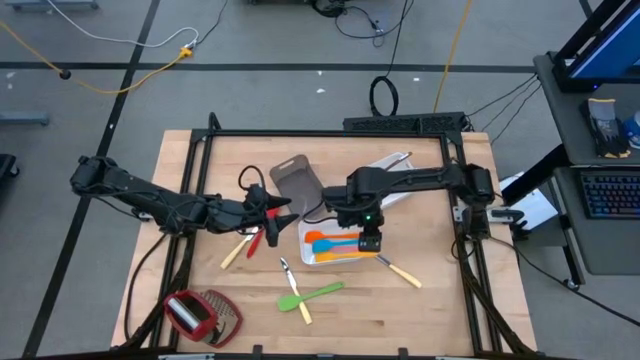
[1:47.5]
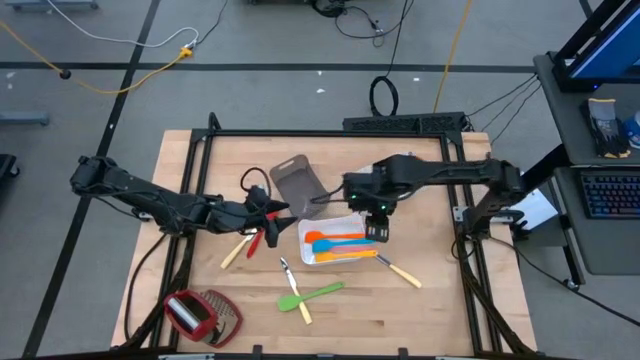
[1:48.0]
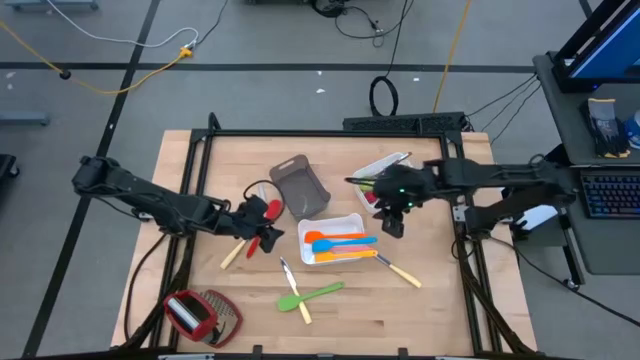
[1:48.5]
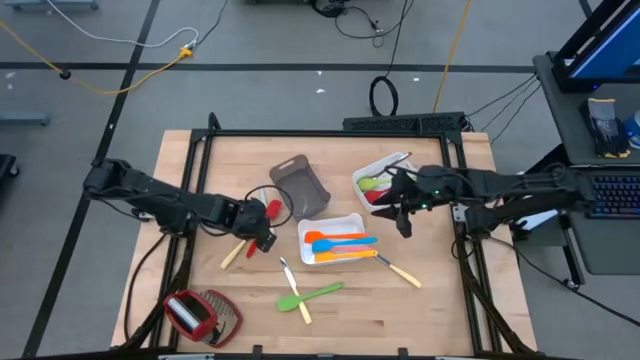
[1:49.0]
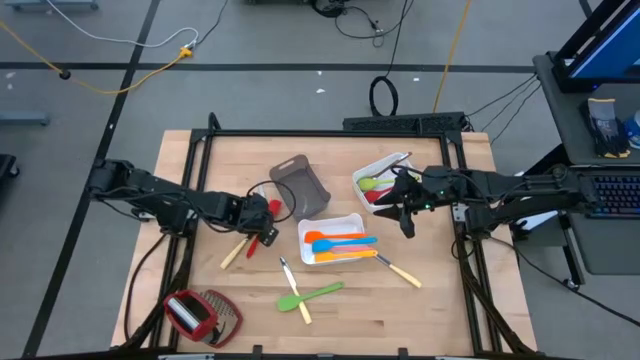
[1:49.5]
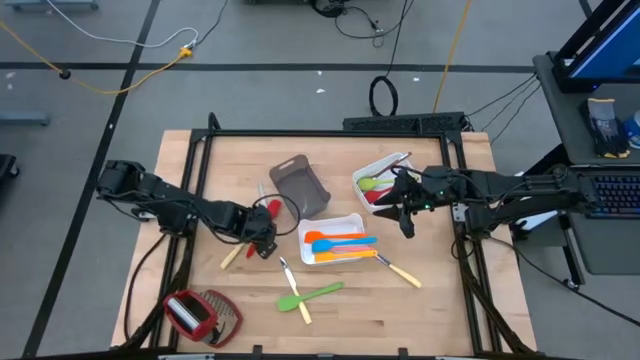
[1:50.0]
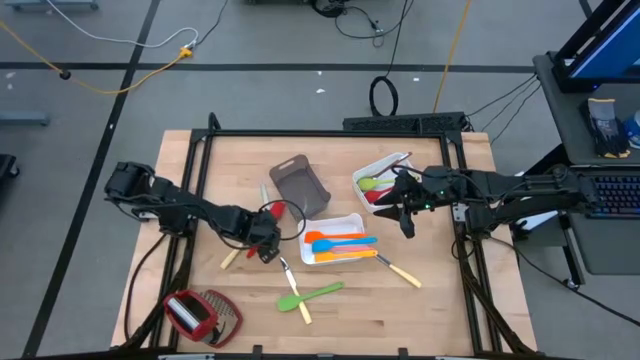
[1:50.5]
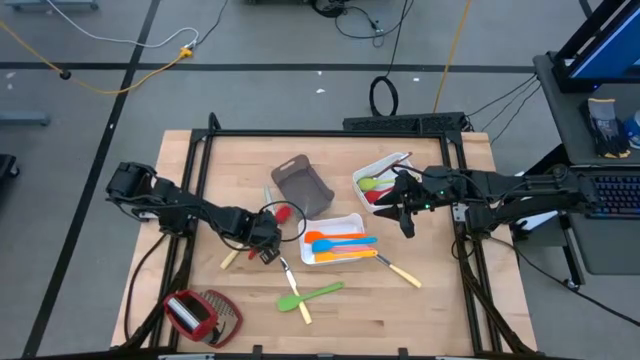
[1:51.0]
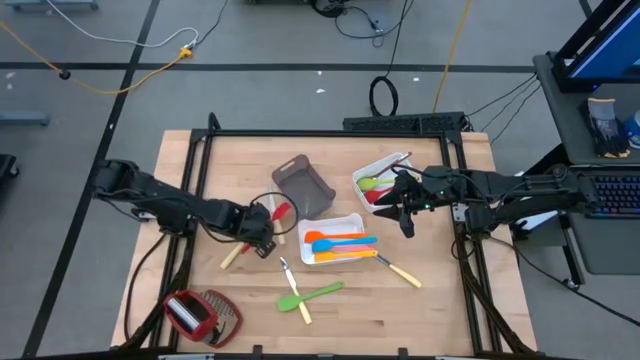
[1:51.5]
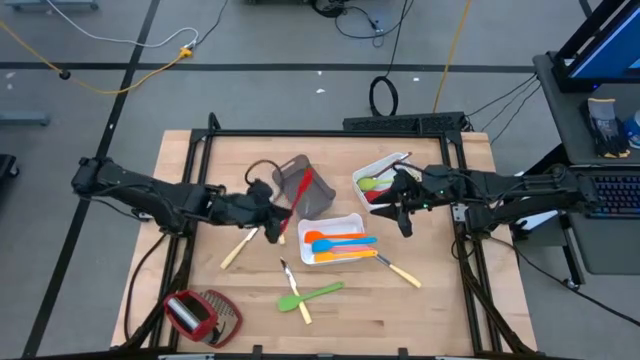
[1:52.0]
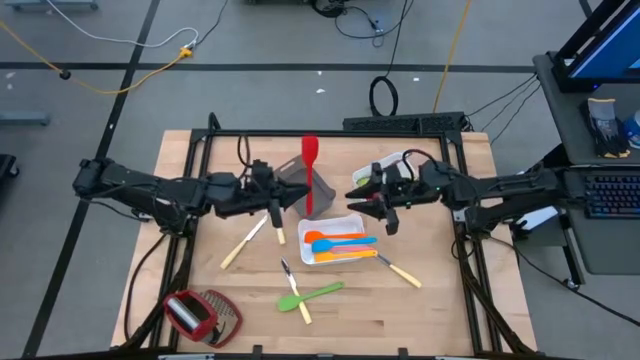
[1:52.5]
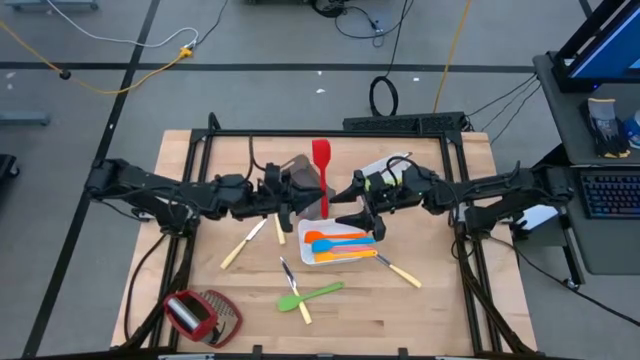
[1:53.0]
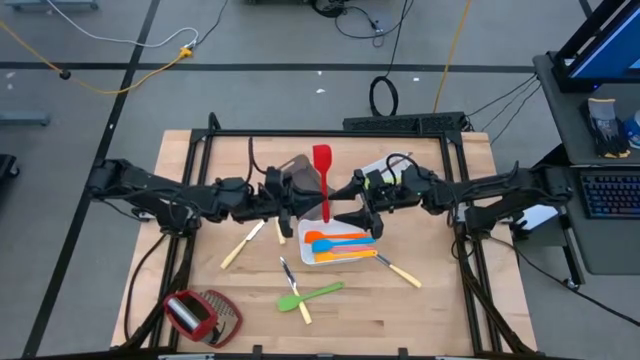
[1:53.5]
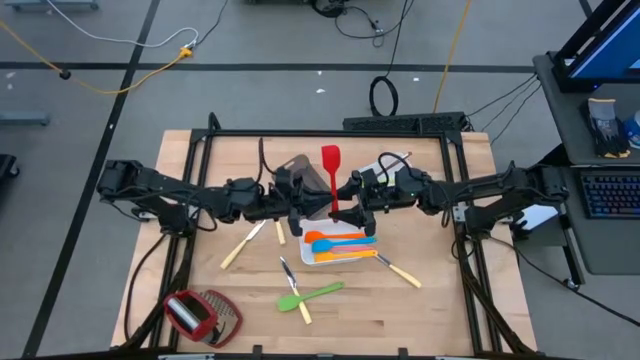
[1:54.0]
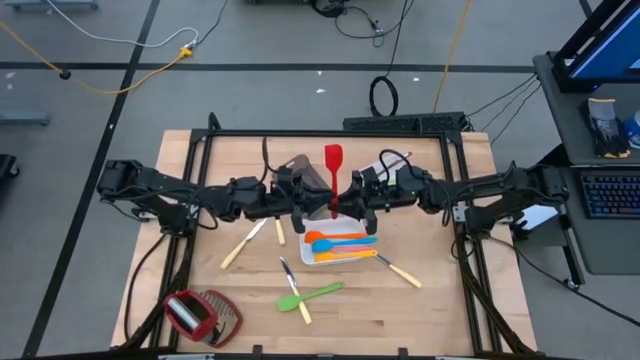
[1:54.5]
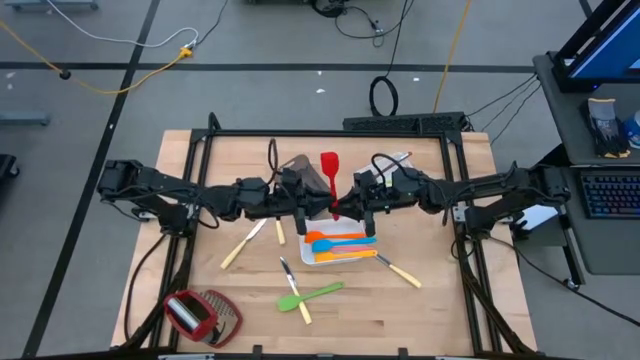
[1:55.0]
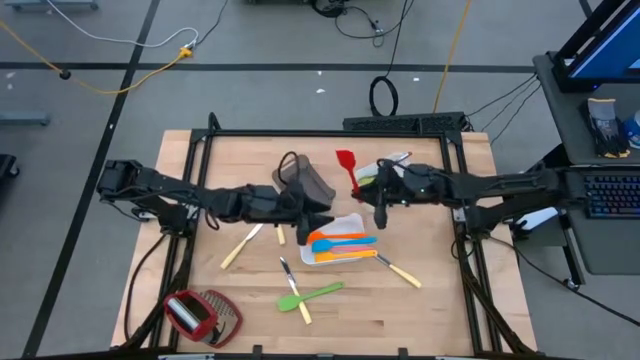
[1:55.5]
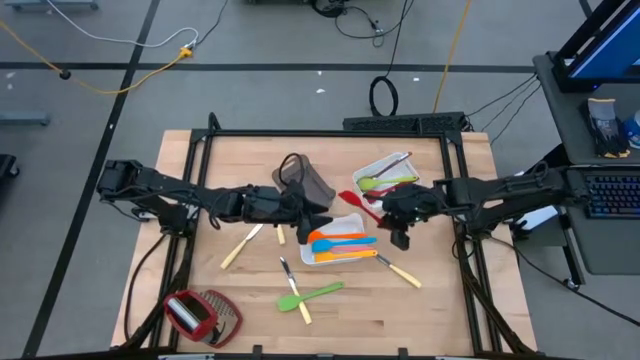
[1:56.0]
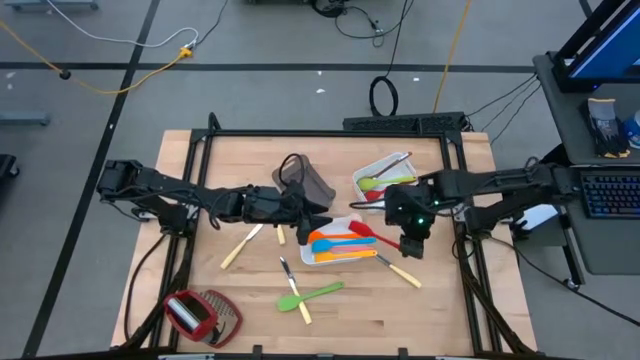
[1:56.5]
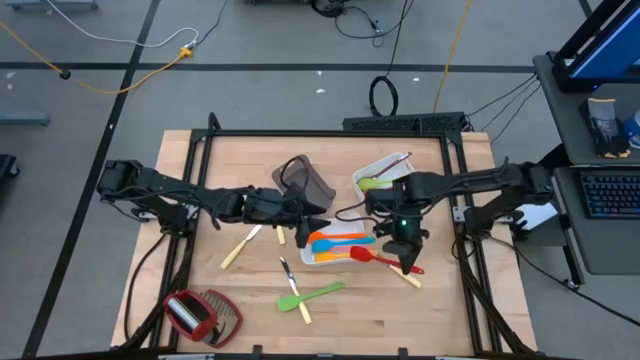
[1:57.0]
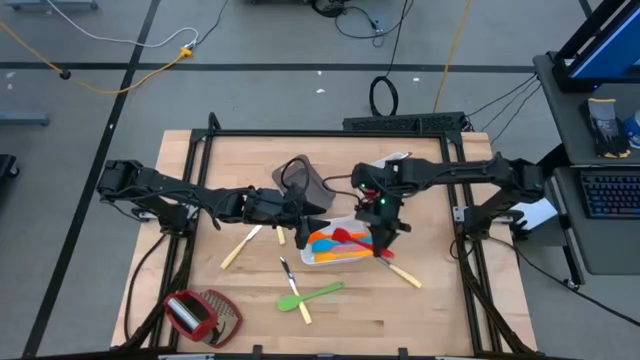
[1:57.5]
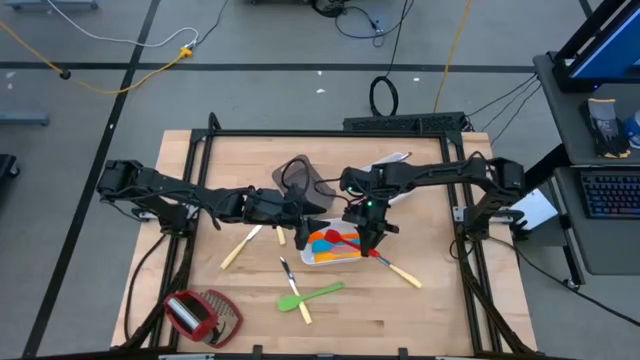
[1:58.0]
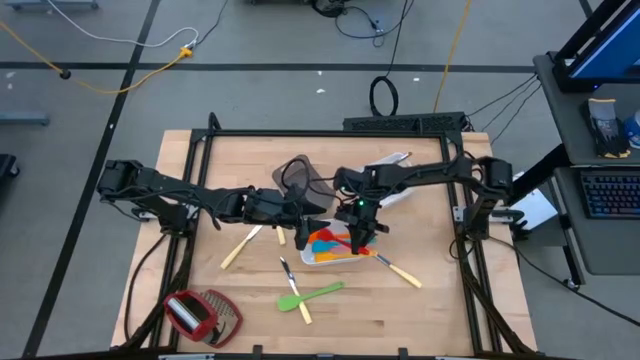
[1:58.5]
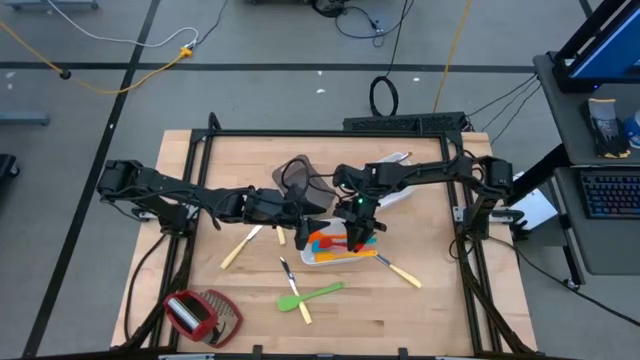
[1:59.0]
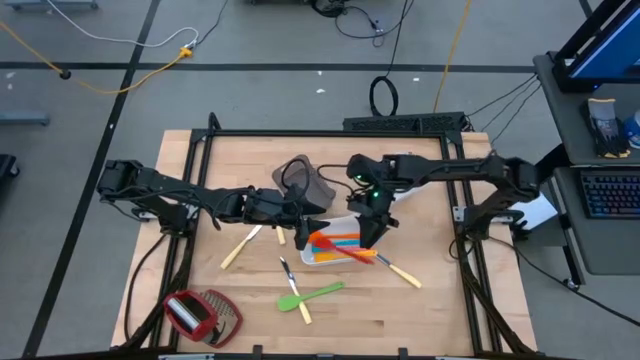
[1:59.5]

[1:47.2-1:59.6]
Task: Pick & Place Kitchen Items
Put the red spatula into bottom white bin

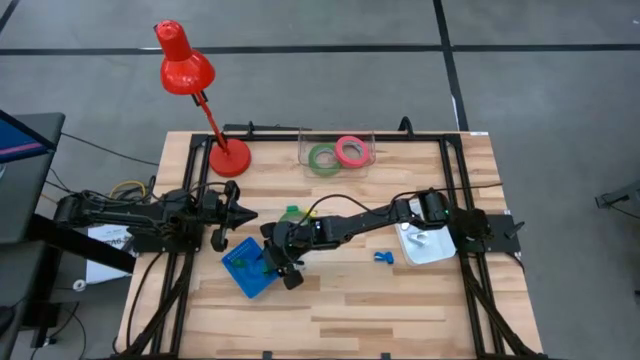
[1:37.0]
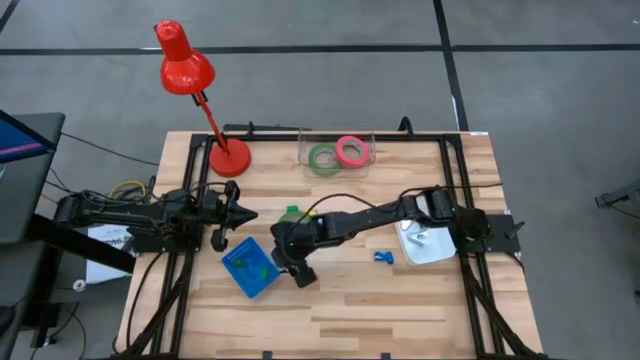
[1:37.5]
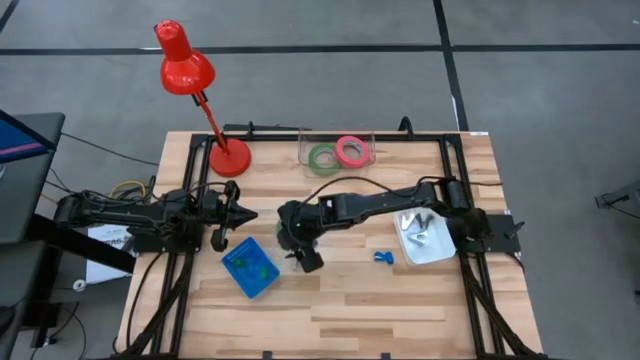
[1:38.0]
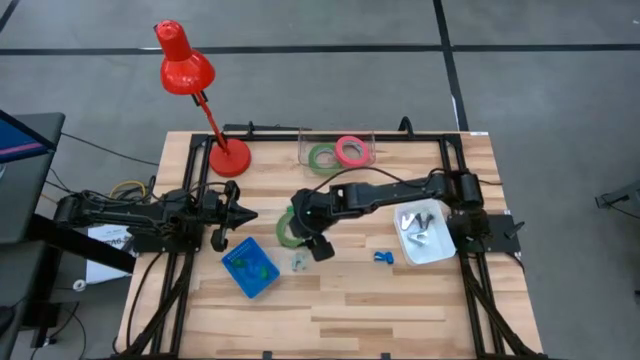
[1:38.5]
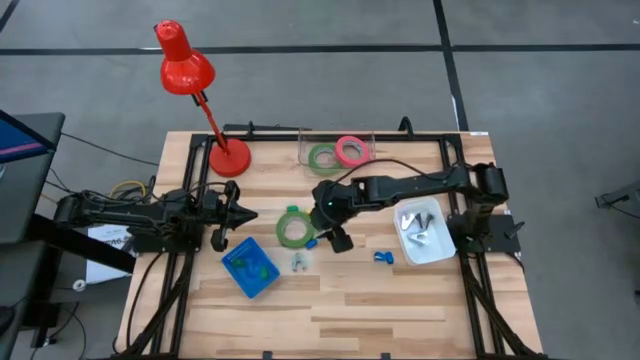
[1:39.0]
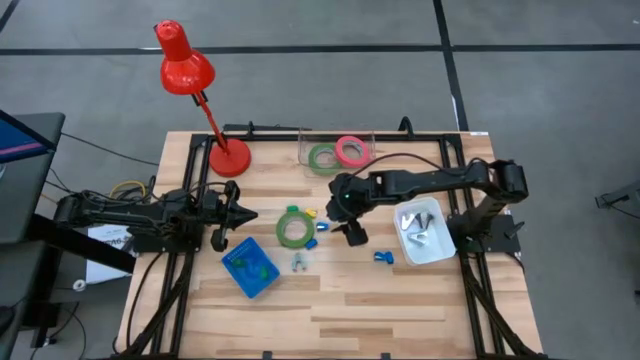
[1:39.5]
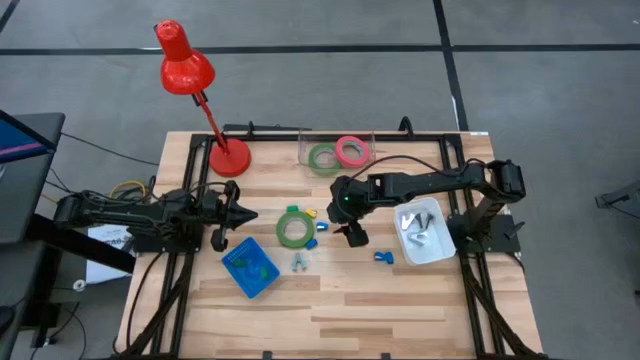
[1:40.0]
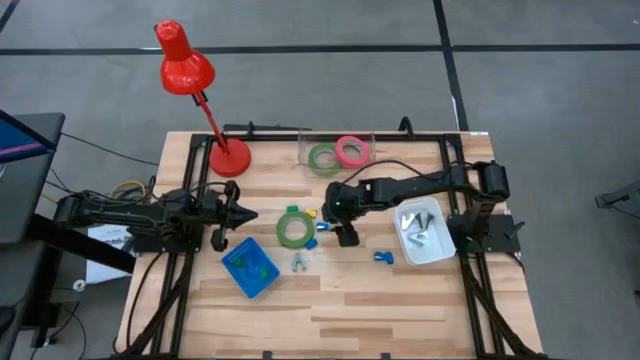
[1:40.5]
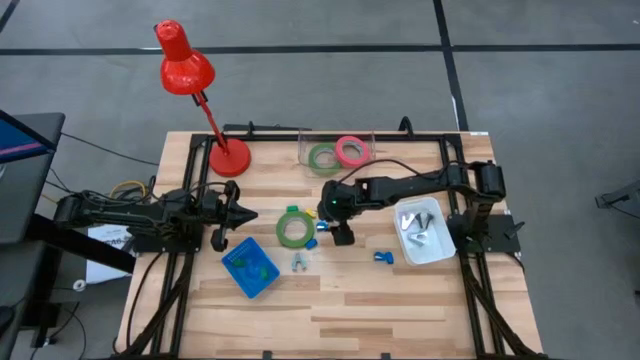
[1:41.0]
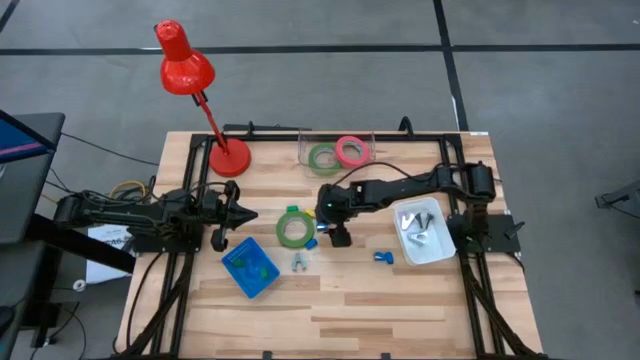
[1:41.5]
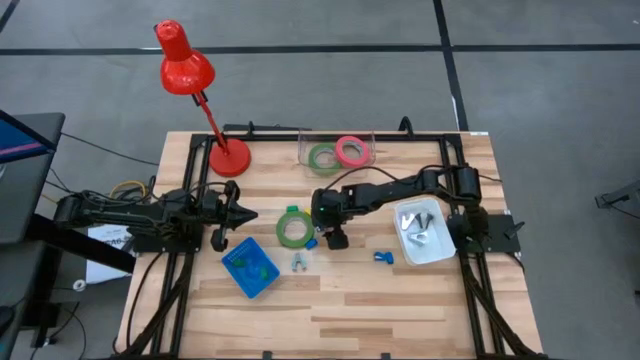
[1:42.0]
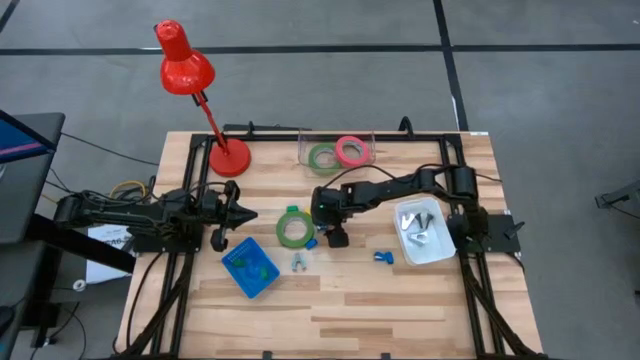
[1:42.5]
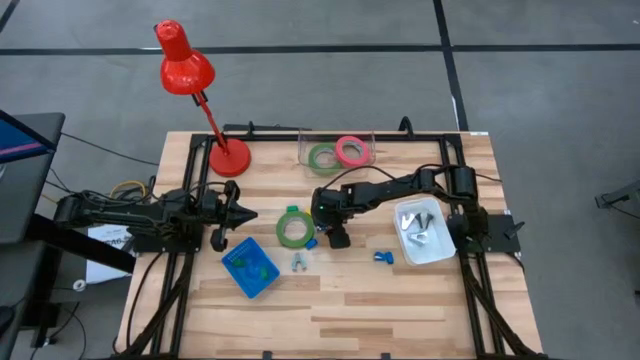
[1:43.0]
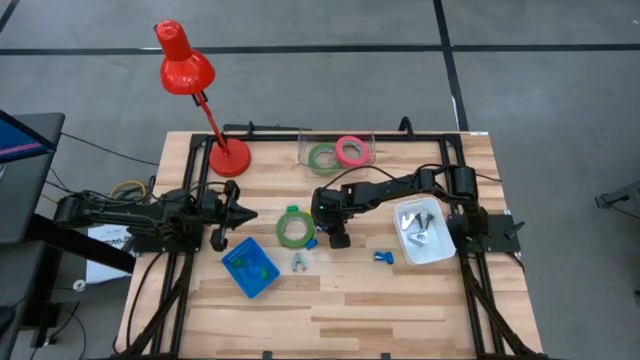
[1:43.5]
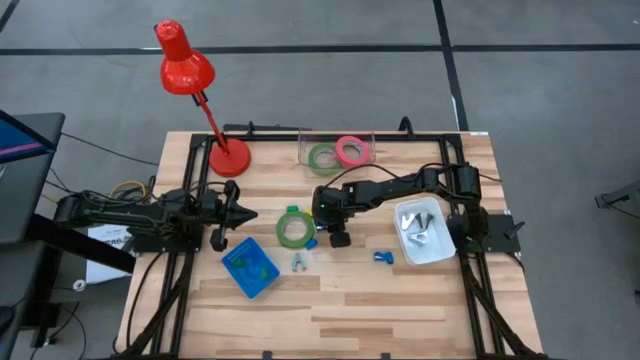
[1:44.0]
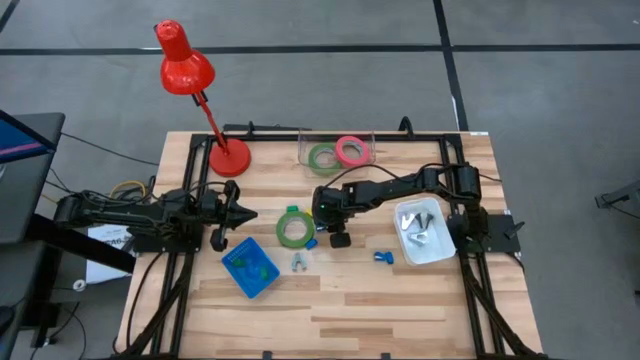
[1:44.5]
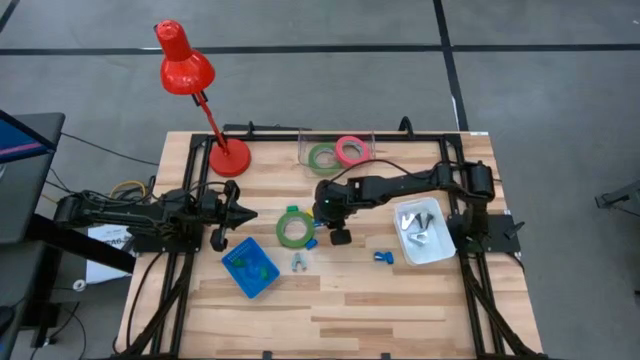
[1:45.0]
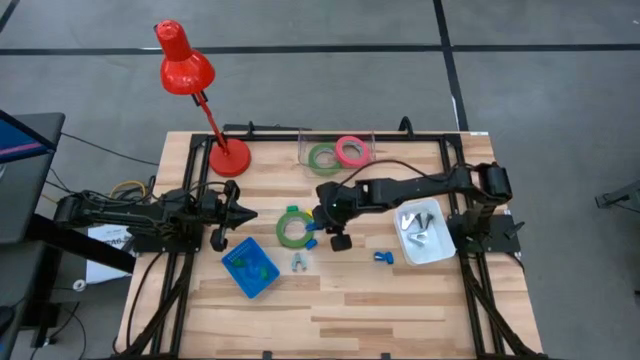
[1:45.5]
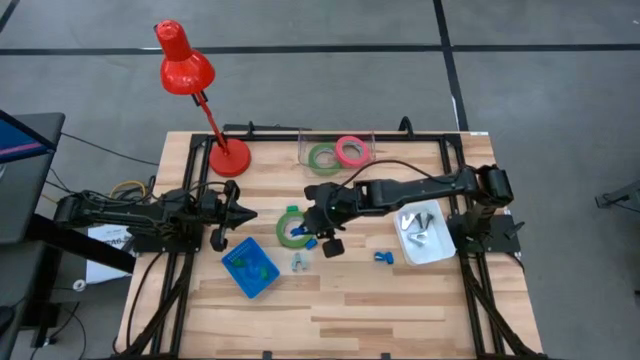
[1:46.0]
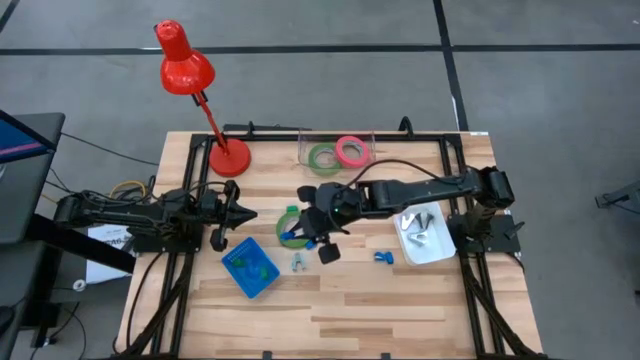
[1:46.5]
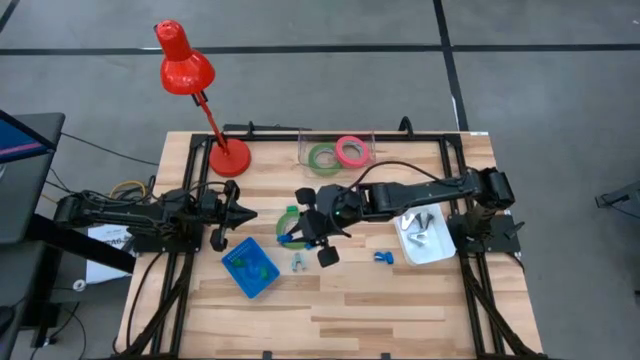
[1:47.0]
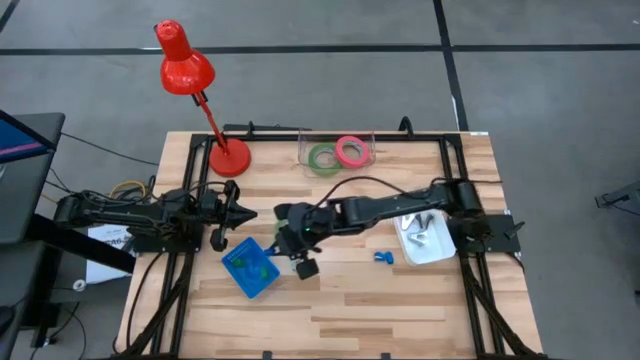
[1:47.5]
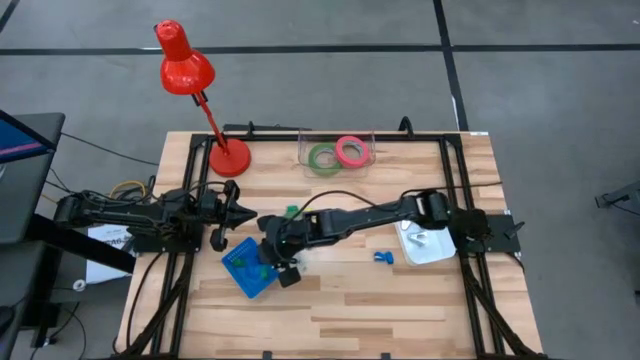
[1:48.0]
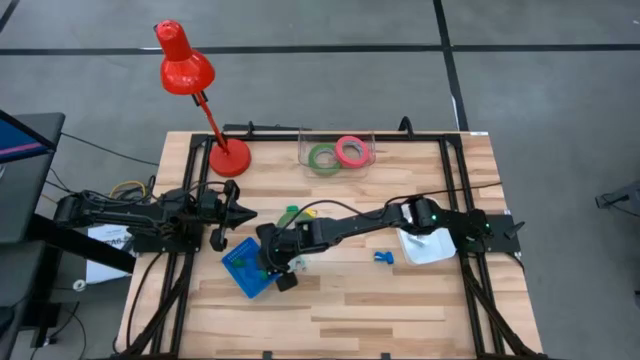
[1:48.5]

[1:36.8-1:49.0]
Task: Pick and place Stapler, Stapler remover, tape
Put the top blue stapler into the blue bin
